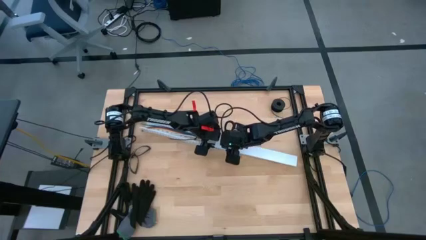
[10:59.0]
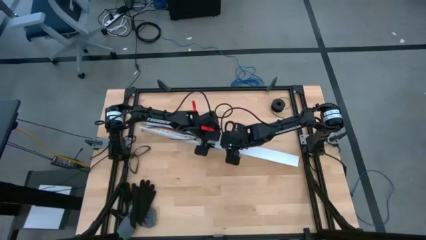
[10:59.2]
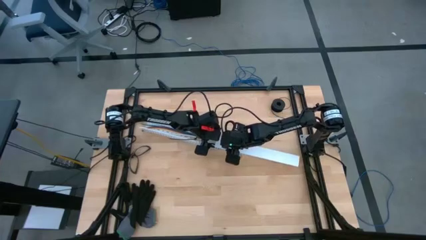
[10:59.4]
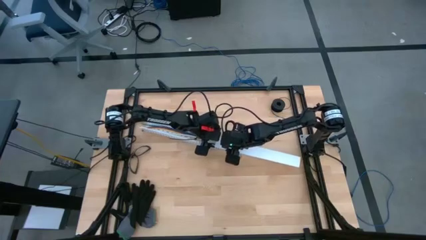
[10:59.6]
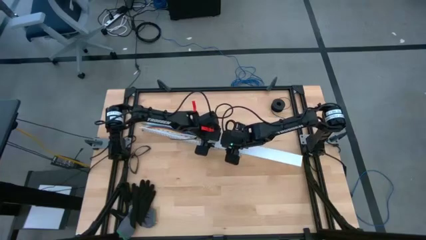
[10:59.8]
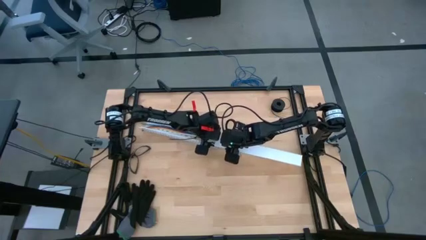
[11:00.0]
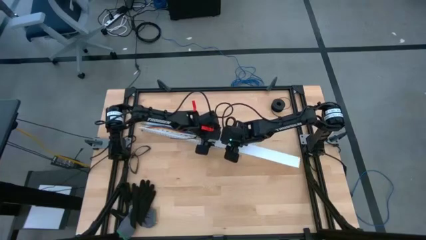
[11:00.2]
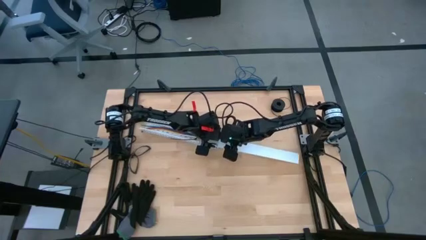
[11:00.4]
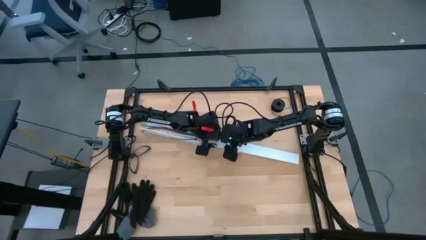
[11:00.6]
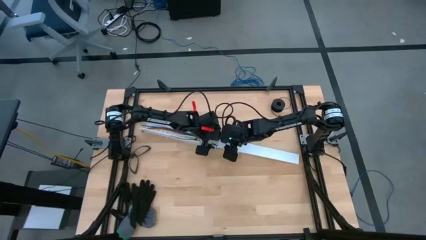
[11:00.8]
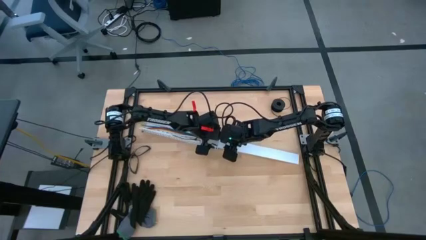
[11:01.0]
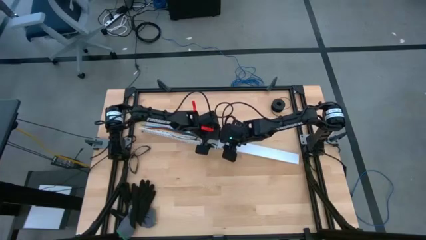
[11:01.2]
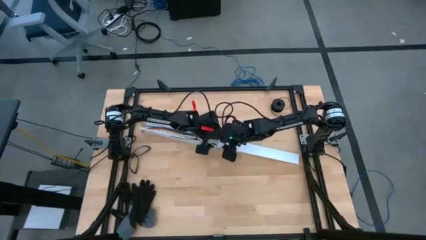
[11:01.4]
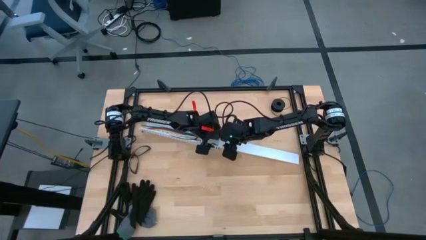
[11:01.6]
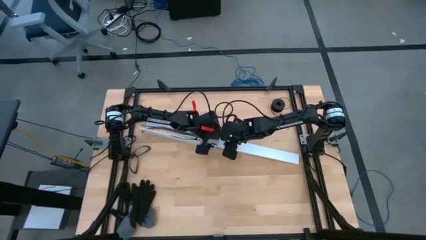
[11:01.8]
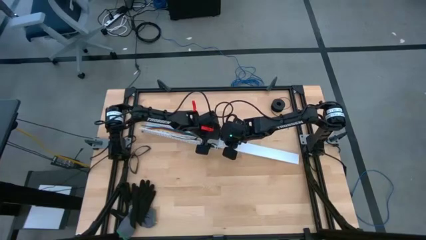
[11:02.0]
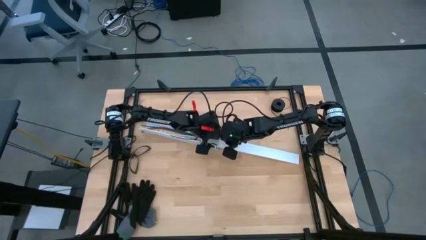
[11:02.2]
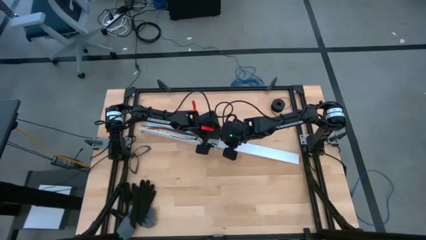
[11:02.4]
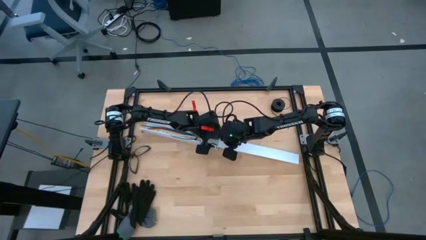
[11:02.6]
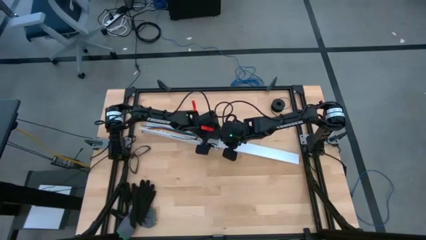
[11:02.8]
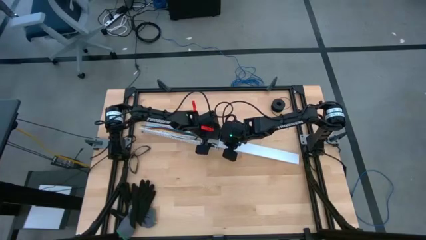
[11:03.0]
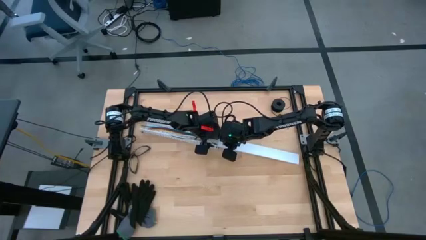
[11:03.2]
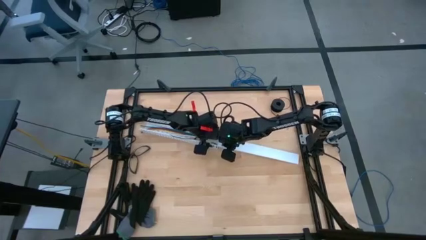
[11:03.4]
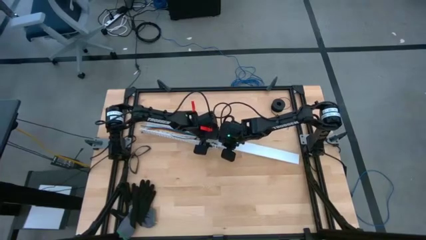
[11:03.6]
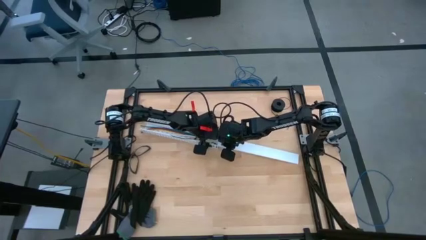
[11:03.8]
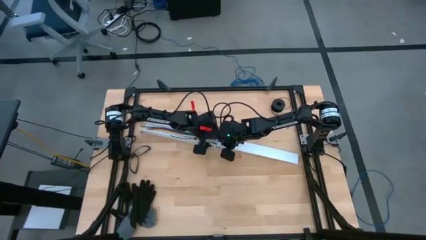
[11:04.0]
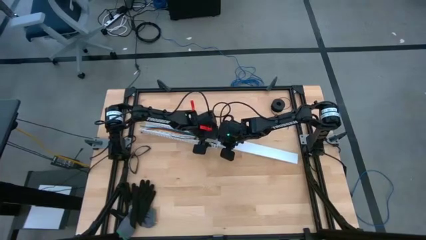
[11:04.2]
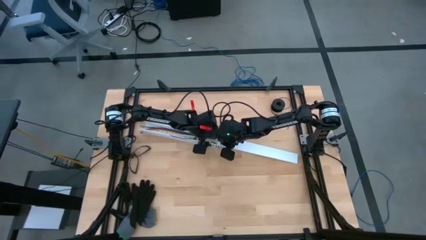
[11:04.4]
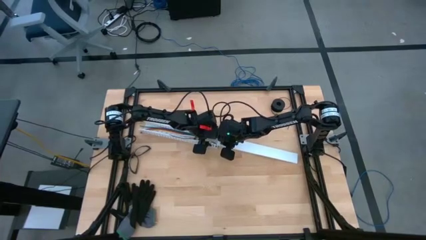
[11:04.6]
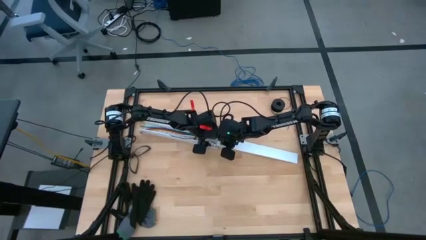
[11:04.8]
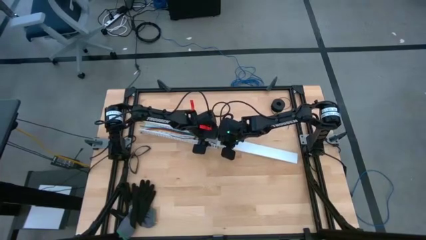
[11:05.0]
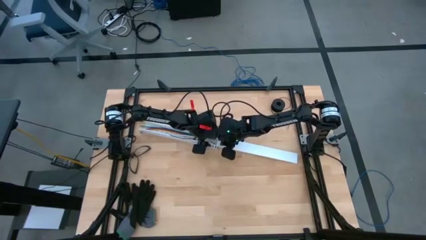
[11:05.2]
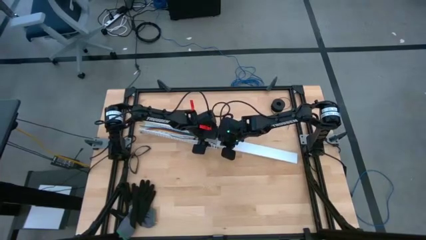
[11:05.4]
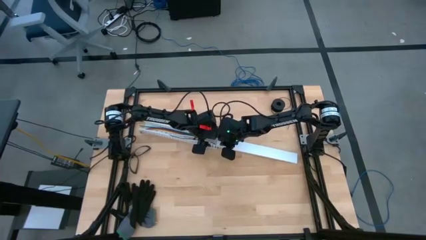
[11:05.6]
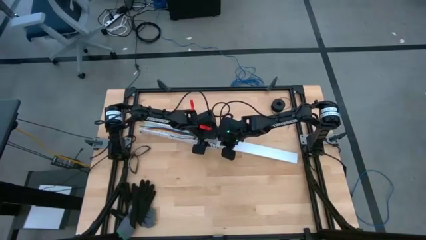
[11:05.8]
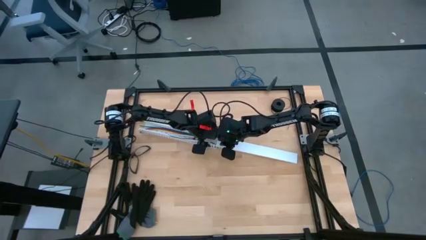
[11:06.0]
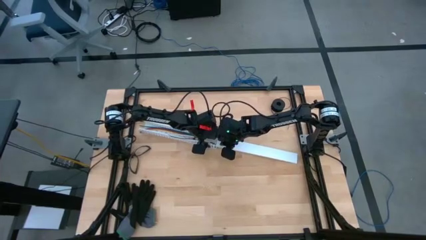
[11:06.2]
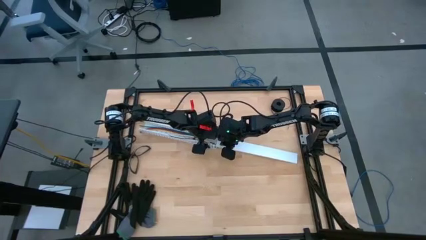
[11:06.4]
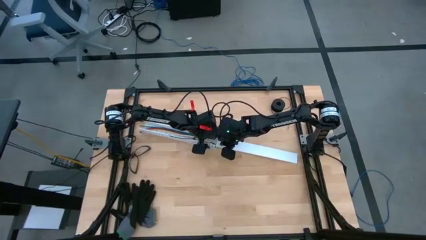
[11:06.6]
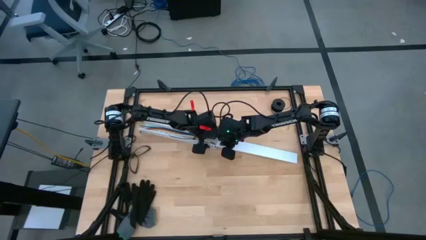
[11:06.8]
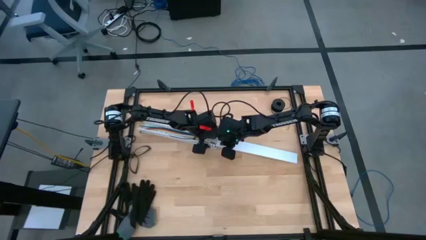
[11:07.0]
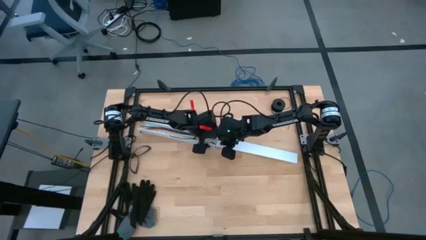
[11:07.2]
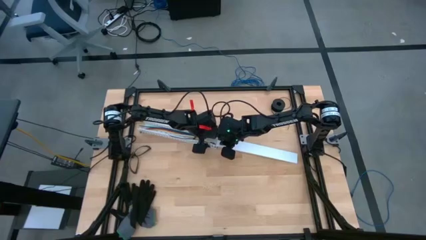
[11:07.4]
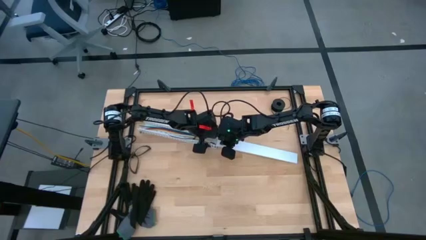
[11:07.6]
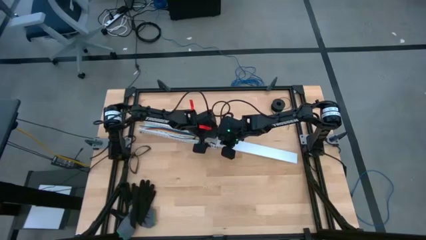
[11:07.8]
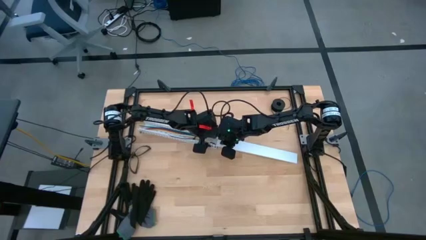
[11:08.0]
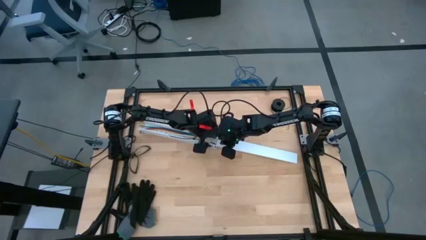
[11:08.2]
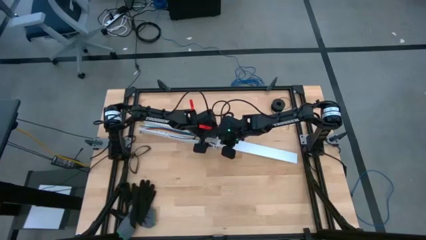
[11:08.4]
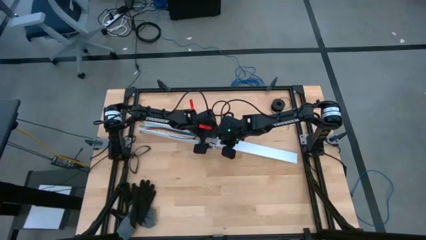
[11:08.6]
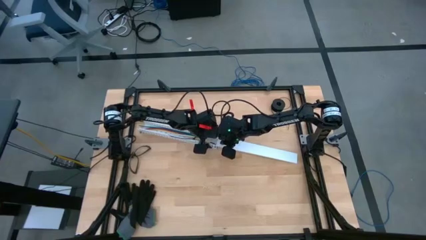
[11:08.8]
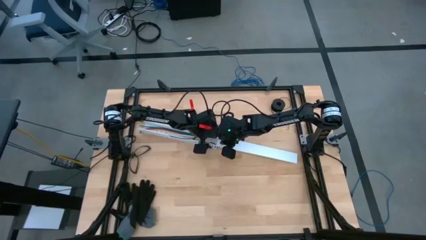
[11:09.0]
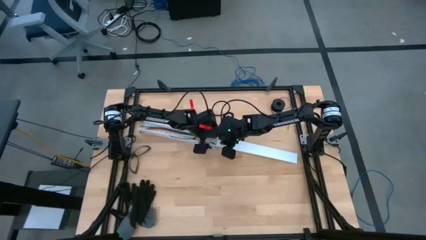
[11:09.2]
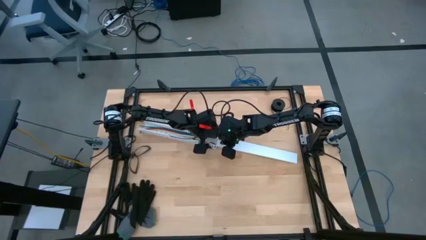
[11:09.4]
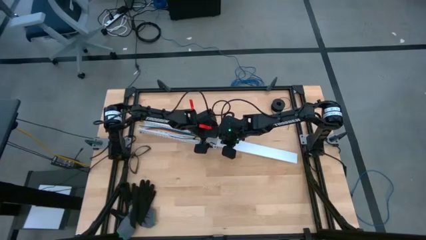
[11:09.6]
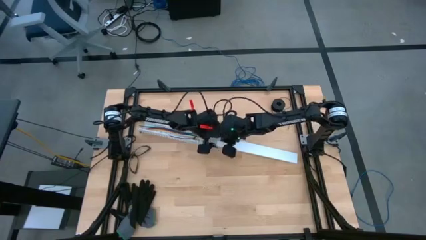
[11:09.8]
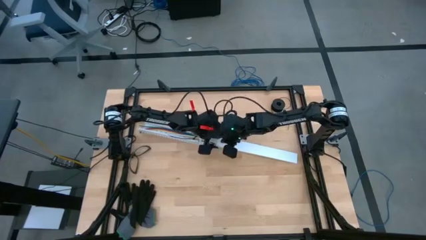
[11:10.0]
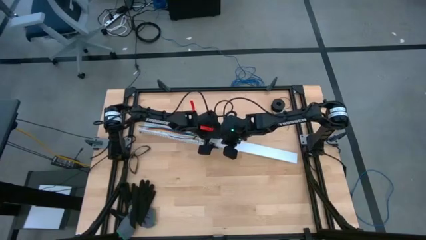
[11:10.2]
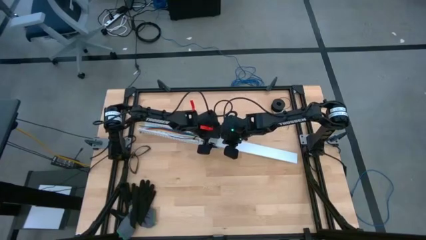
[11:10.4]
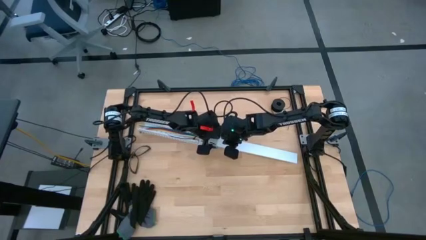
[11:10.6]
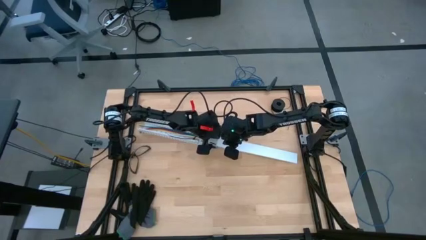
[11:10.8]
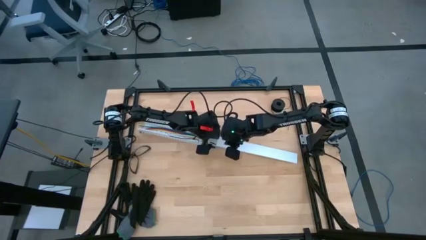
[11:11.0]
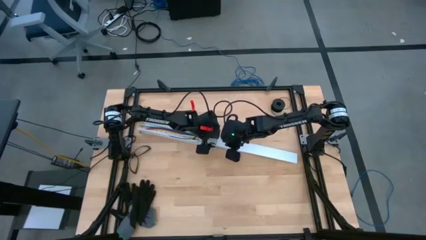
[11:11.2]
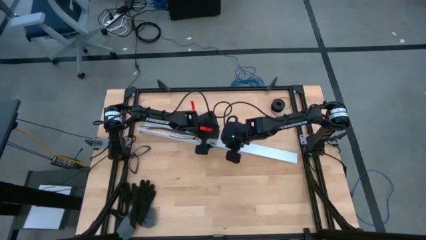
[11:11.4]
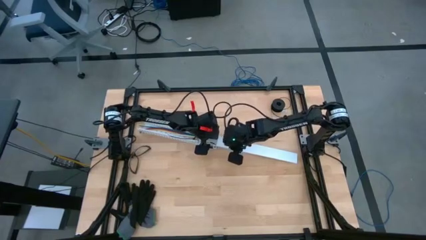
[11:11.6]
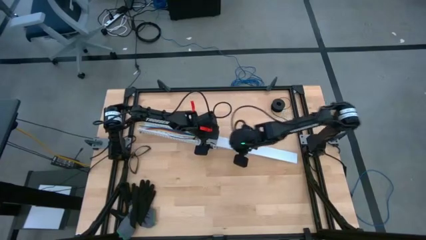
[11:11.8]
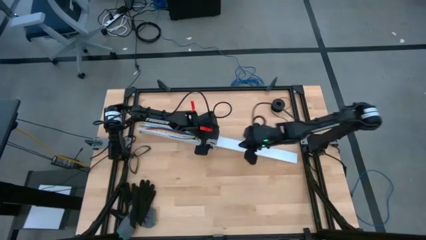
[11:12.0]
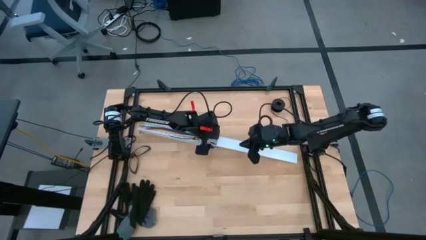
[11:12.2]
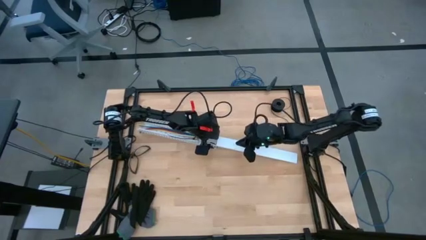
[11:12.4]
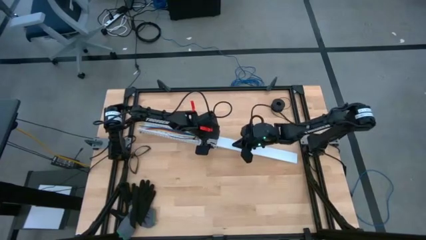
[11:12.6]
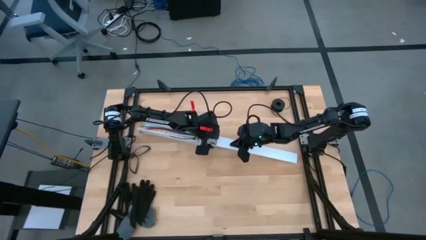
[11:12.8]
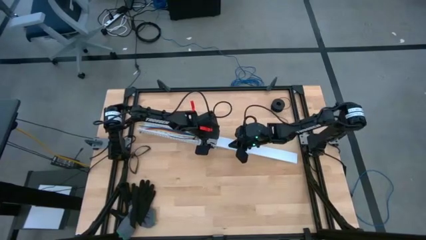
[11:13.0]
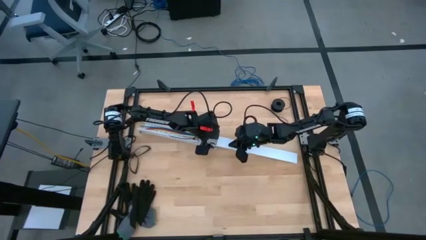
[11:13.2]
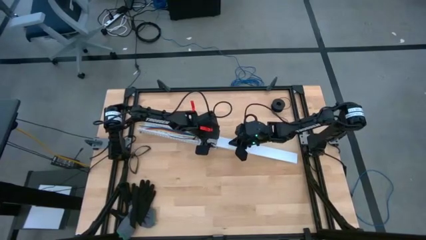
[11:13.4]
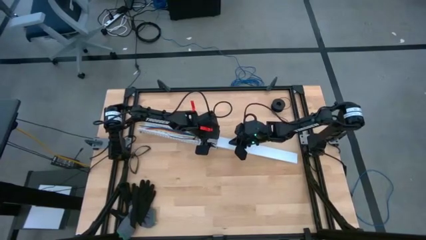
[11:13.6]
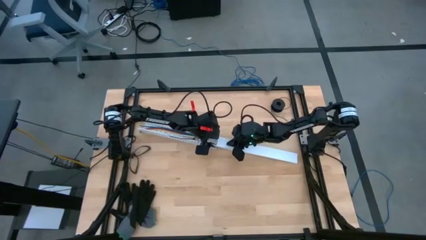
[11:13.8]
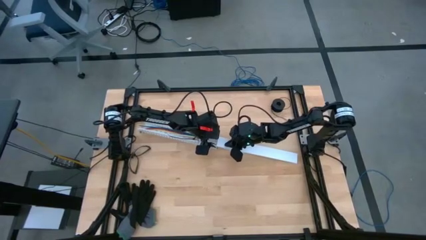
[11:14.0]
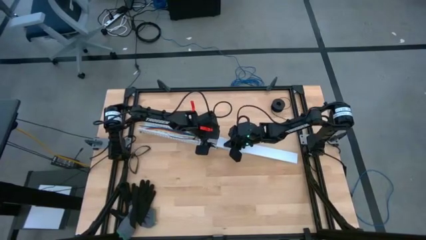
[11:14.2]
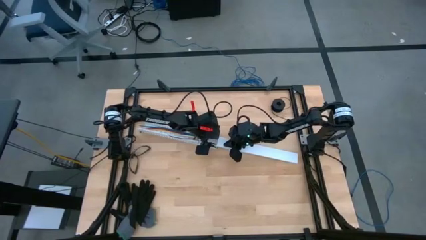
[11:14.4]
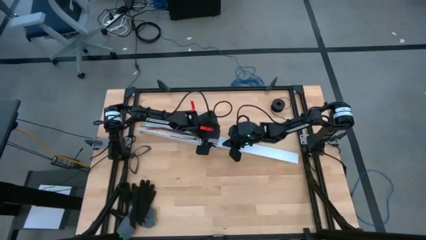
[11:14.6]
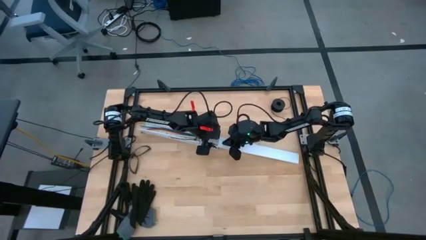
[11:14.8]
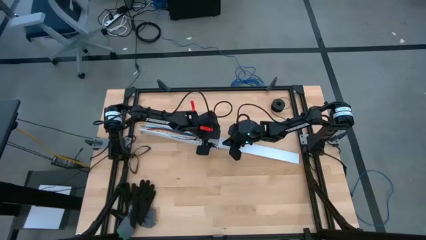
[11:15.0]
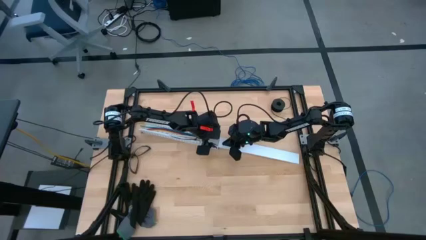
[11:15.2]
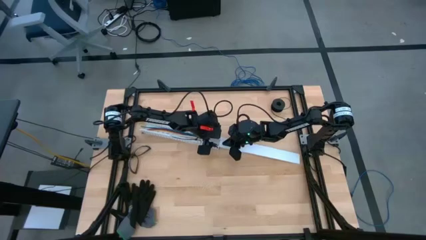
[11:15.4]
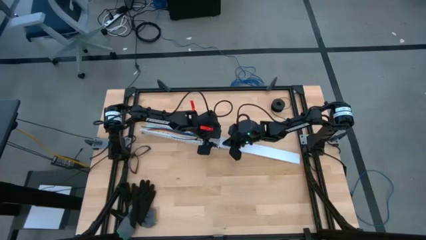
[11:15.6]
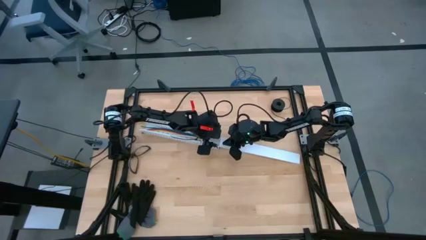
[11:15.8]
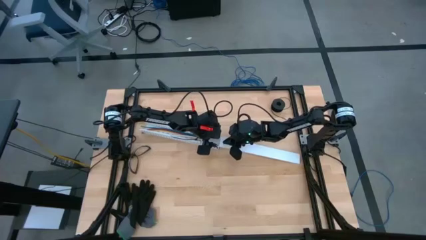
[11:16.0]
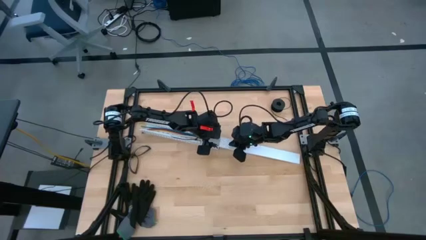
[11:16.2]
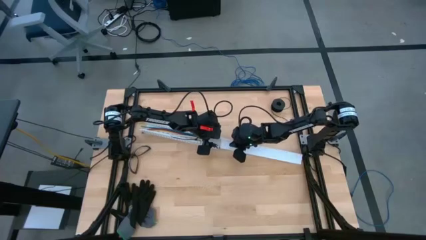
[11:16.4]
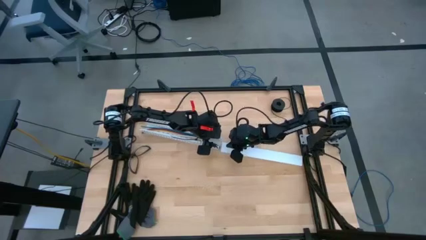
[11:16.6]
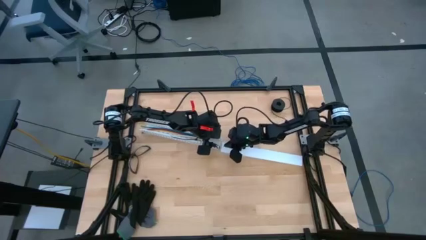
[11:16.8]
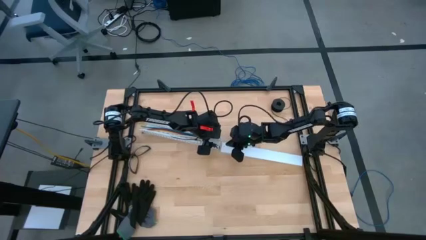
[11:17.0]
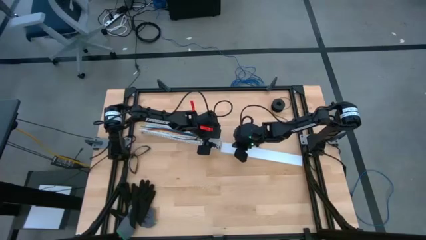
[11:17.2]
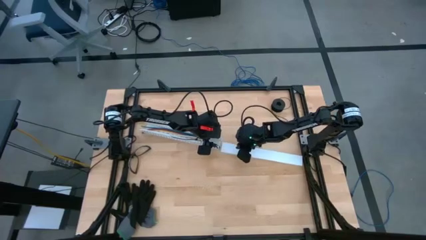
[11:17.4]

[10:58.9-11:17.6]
Task: Ziptie cables
Close the white cable duct
